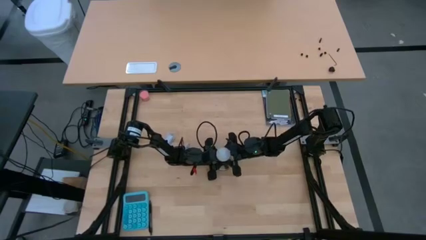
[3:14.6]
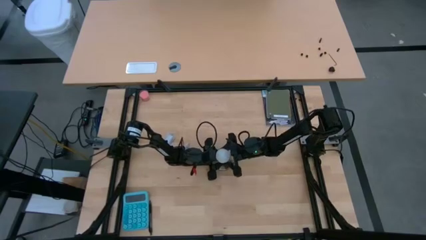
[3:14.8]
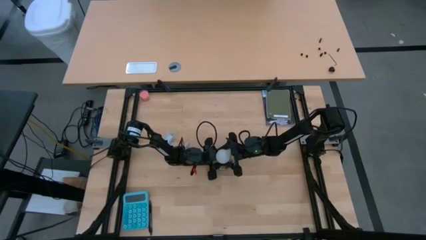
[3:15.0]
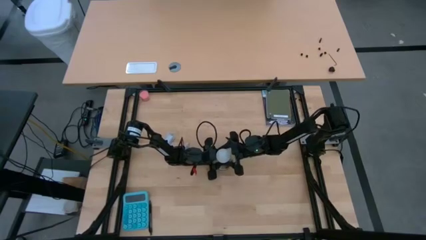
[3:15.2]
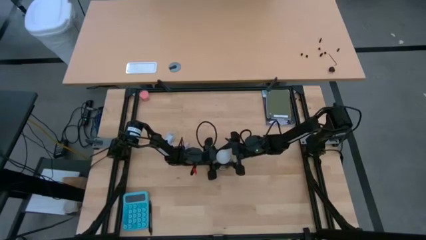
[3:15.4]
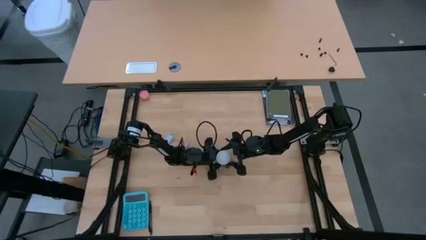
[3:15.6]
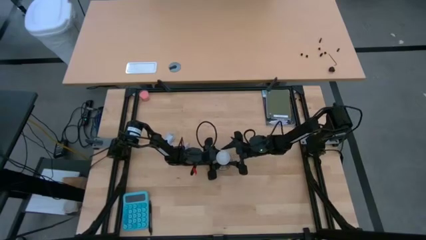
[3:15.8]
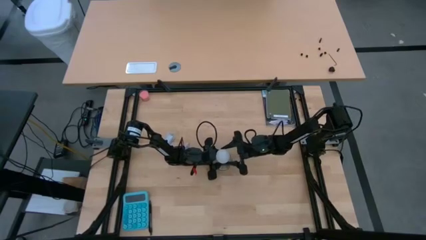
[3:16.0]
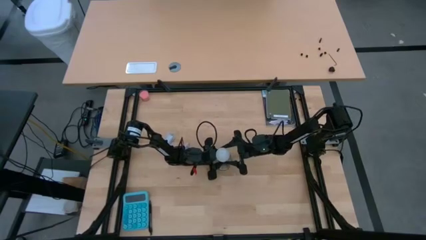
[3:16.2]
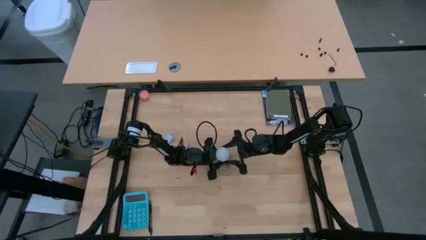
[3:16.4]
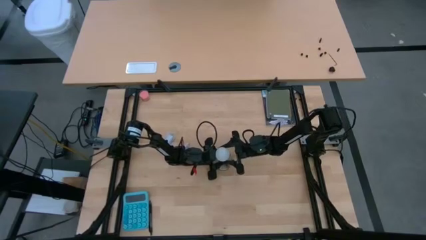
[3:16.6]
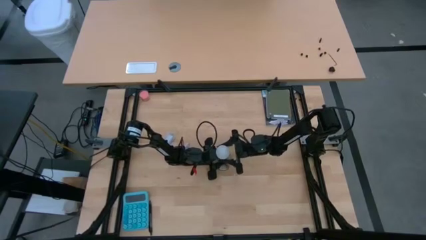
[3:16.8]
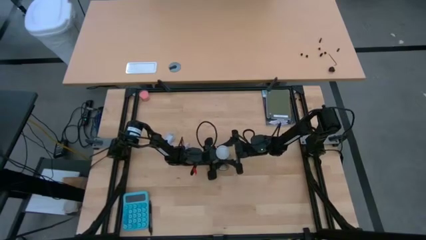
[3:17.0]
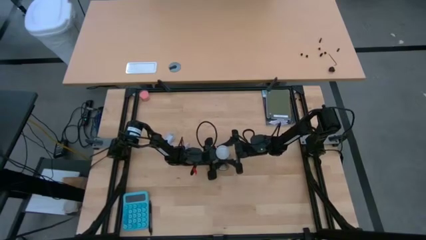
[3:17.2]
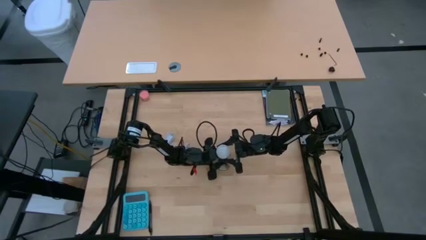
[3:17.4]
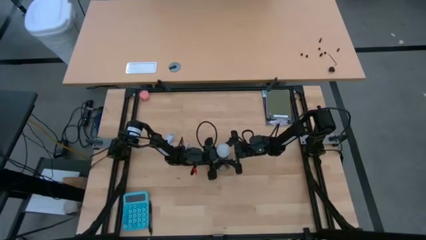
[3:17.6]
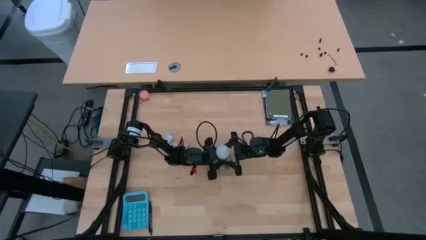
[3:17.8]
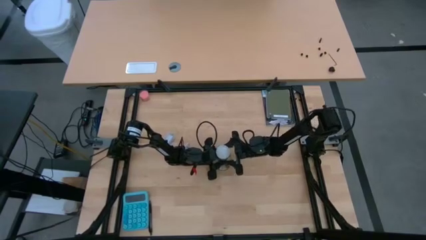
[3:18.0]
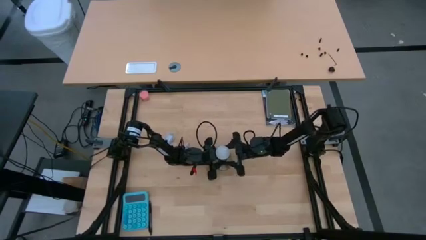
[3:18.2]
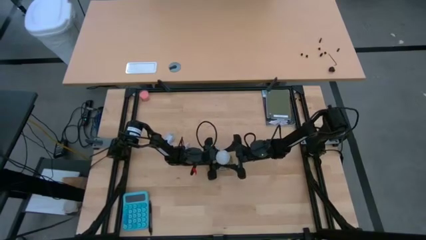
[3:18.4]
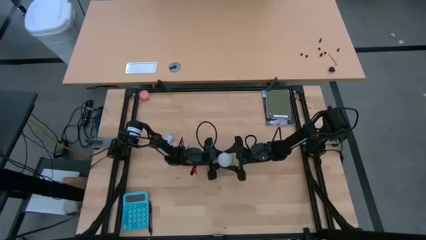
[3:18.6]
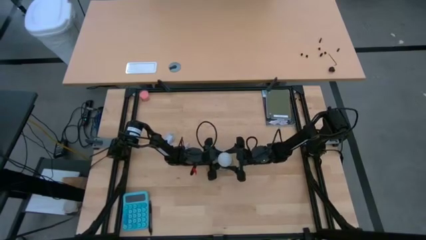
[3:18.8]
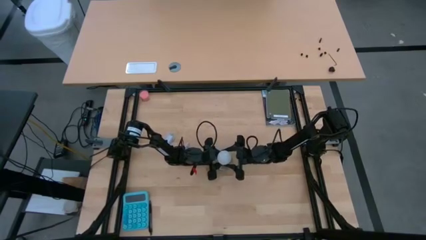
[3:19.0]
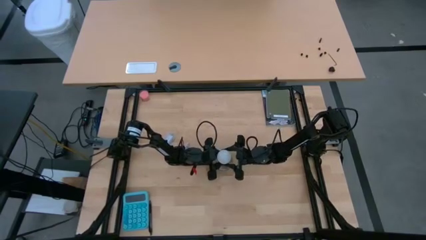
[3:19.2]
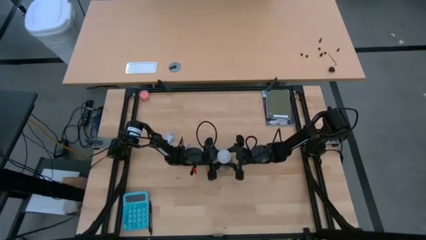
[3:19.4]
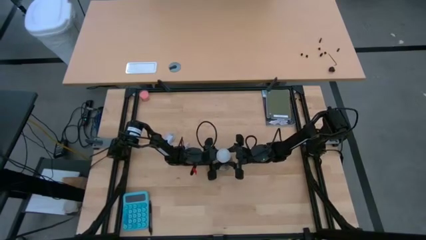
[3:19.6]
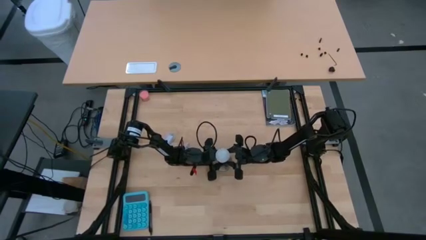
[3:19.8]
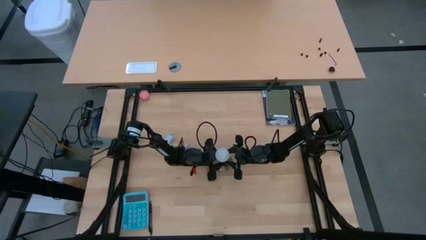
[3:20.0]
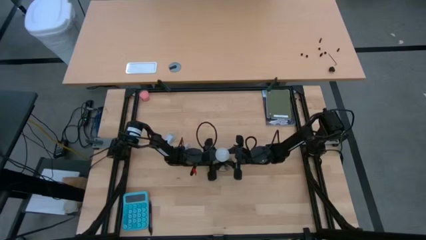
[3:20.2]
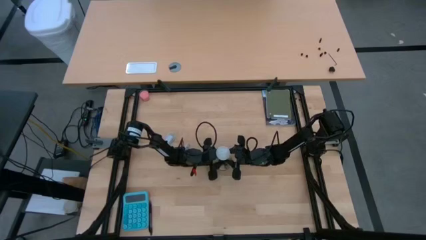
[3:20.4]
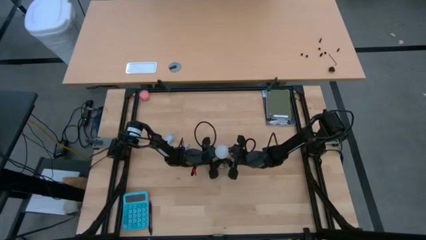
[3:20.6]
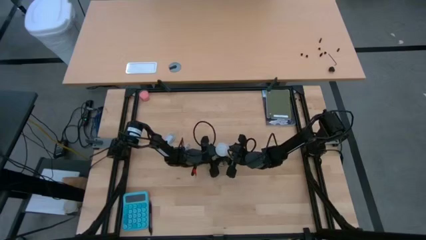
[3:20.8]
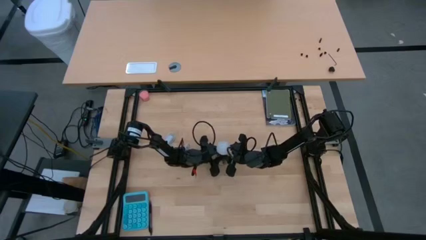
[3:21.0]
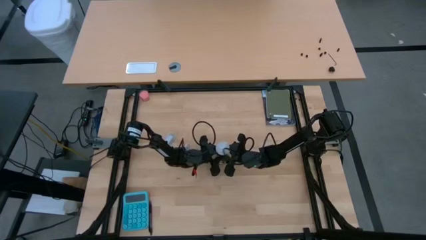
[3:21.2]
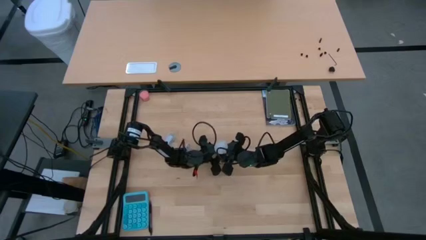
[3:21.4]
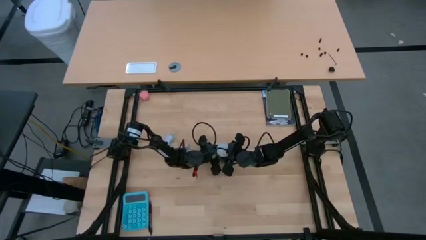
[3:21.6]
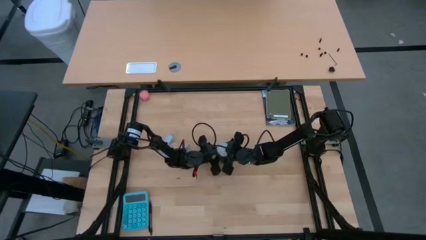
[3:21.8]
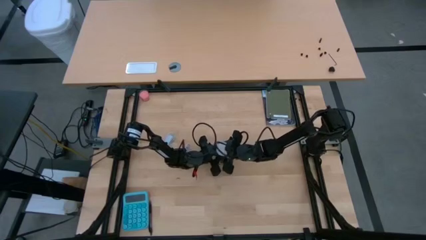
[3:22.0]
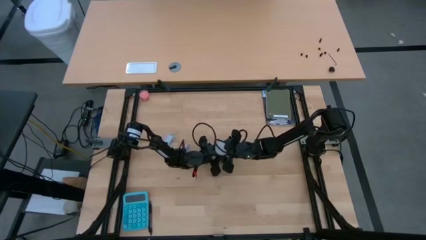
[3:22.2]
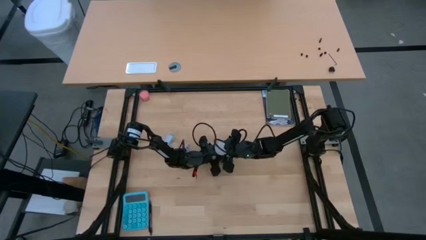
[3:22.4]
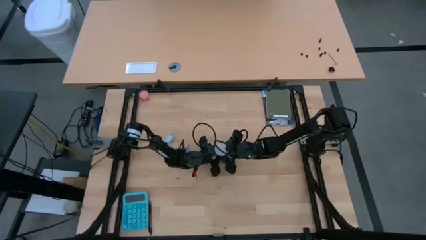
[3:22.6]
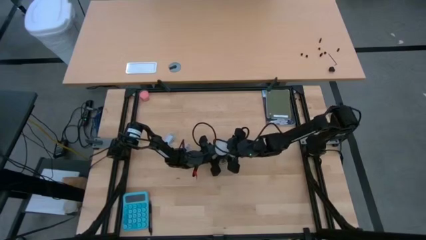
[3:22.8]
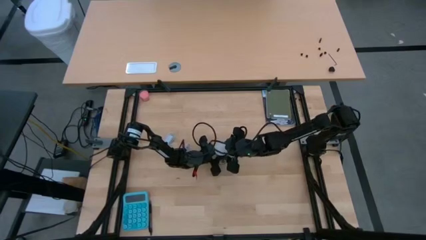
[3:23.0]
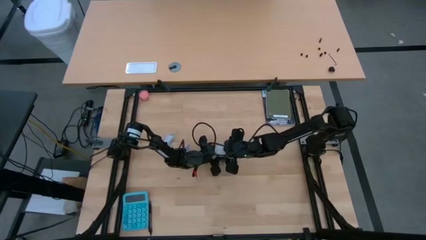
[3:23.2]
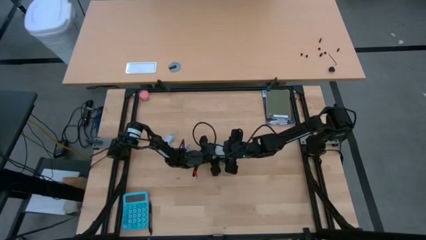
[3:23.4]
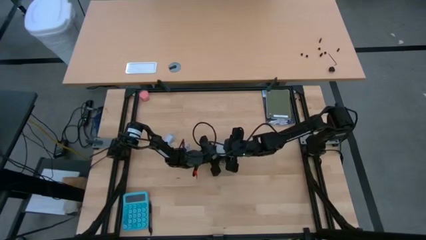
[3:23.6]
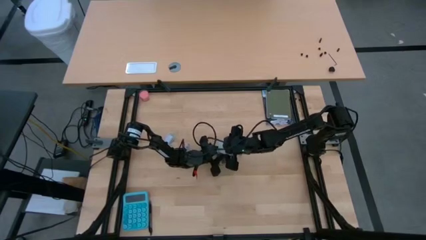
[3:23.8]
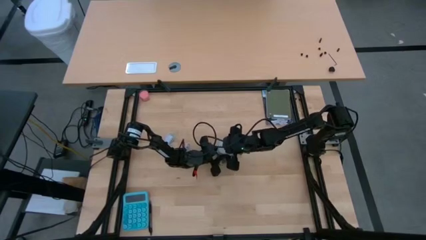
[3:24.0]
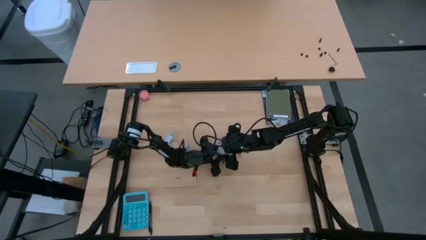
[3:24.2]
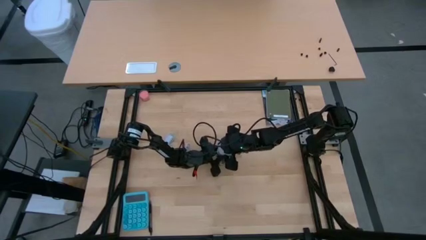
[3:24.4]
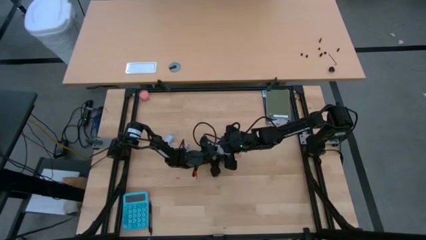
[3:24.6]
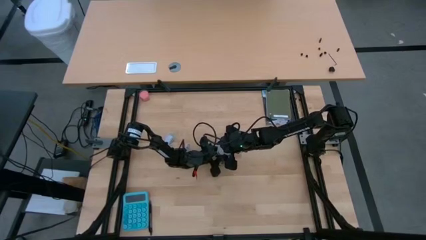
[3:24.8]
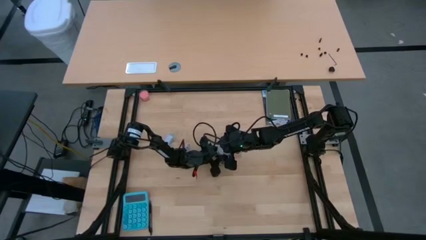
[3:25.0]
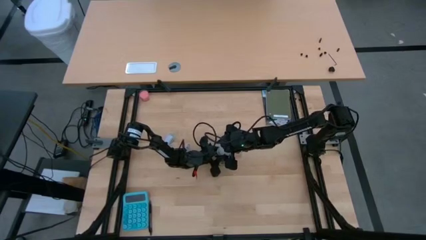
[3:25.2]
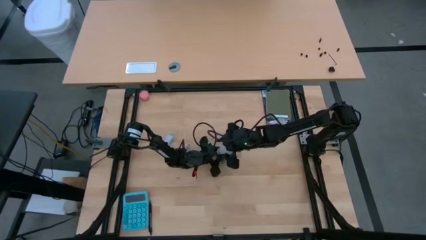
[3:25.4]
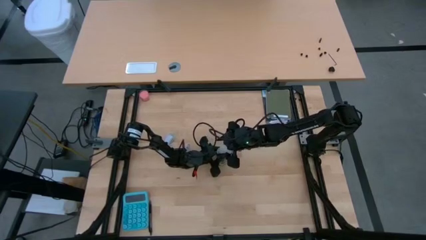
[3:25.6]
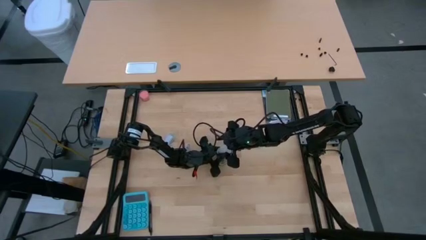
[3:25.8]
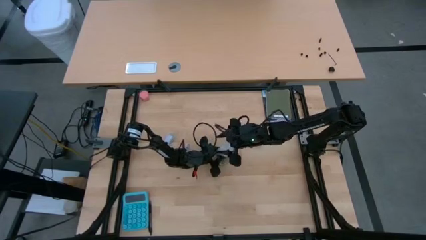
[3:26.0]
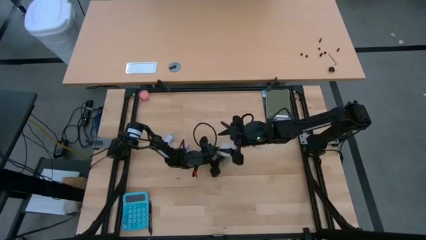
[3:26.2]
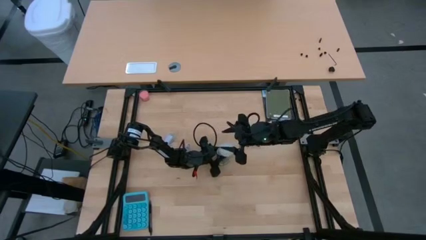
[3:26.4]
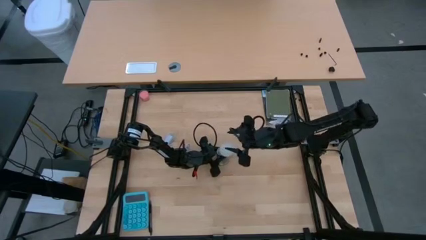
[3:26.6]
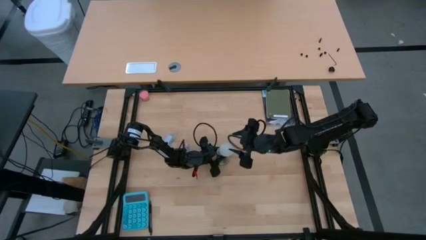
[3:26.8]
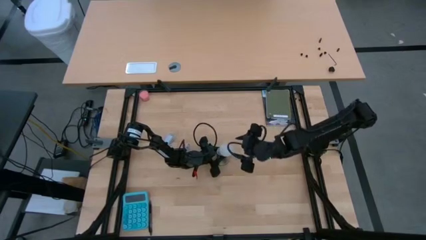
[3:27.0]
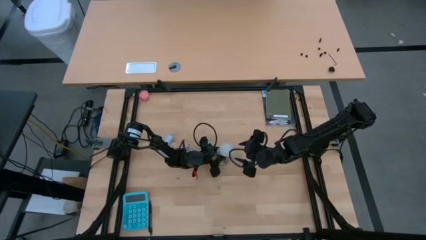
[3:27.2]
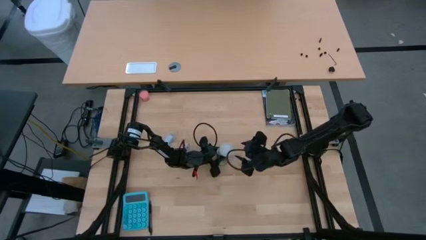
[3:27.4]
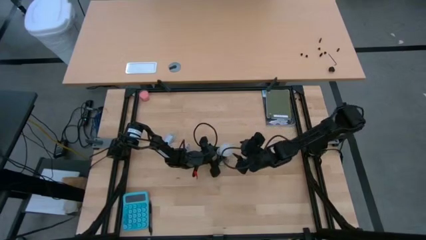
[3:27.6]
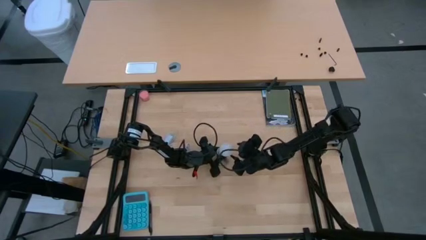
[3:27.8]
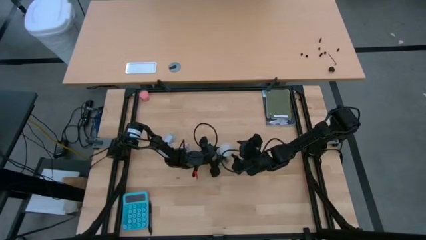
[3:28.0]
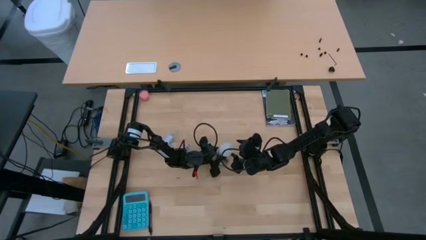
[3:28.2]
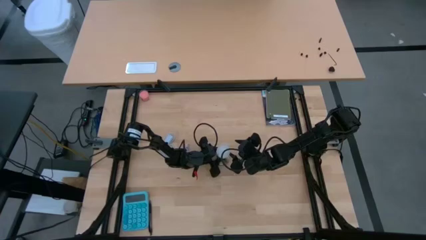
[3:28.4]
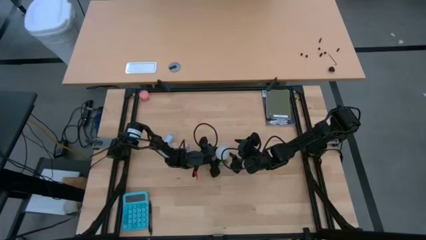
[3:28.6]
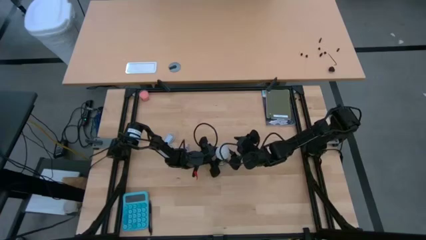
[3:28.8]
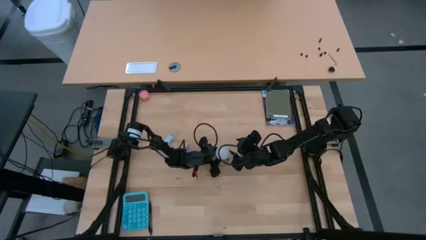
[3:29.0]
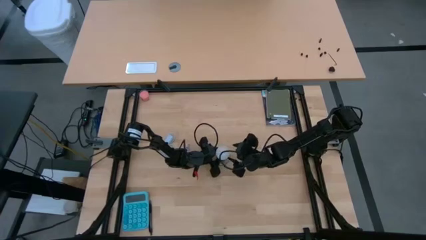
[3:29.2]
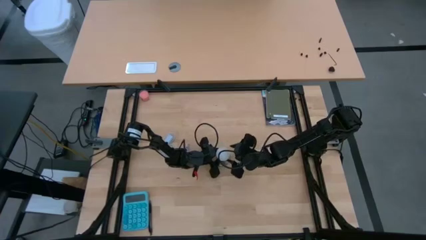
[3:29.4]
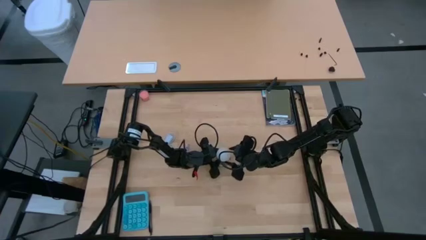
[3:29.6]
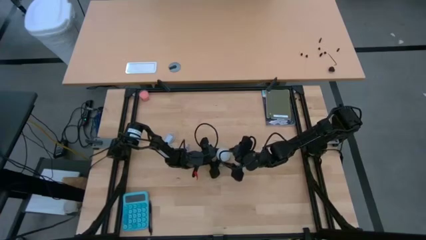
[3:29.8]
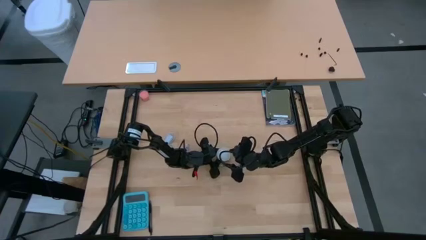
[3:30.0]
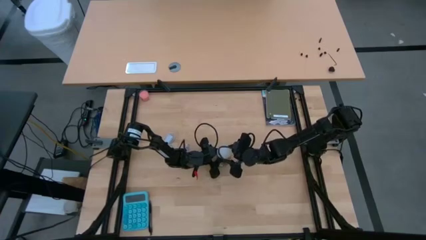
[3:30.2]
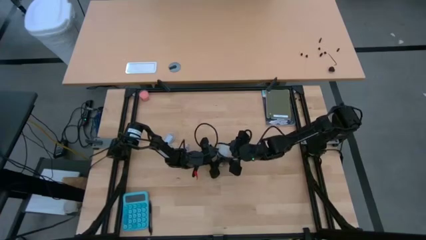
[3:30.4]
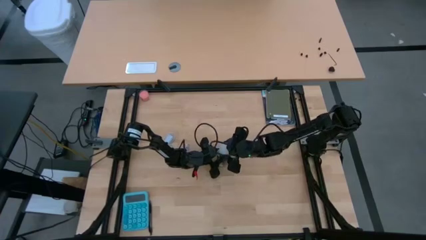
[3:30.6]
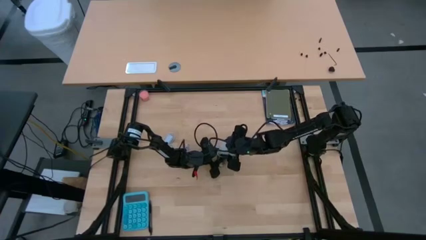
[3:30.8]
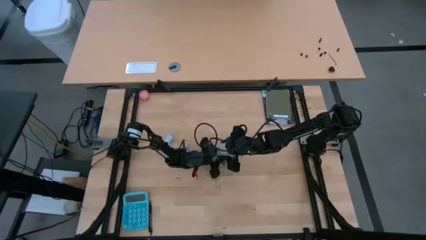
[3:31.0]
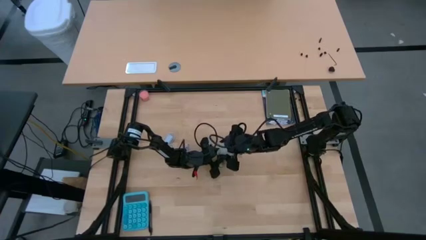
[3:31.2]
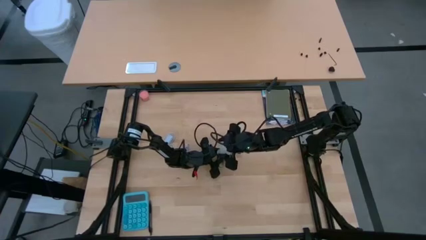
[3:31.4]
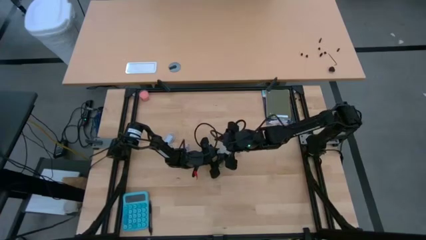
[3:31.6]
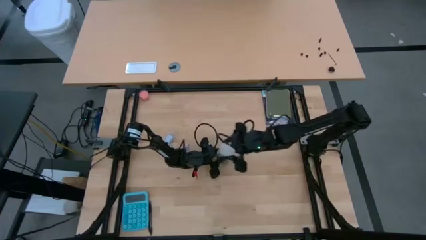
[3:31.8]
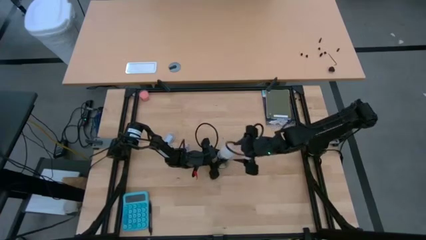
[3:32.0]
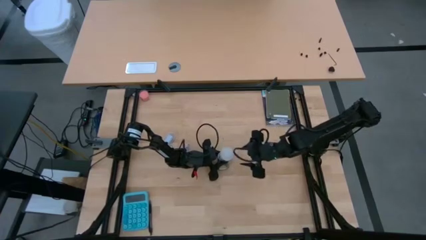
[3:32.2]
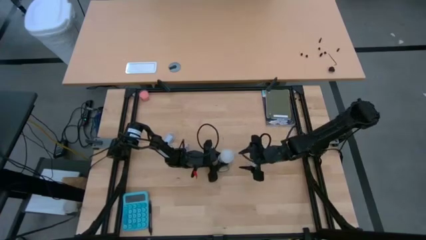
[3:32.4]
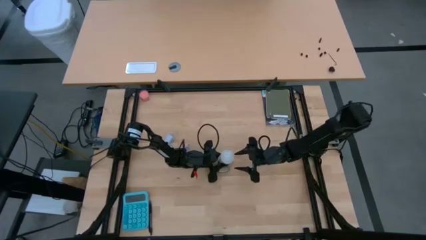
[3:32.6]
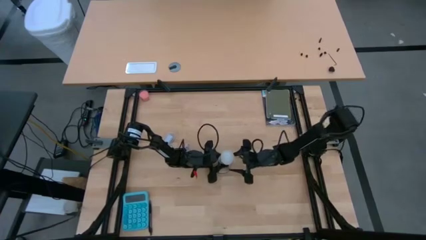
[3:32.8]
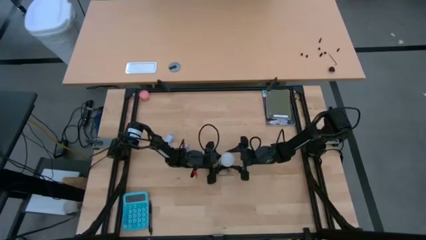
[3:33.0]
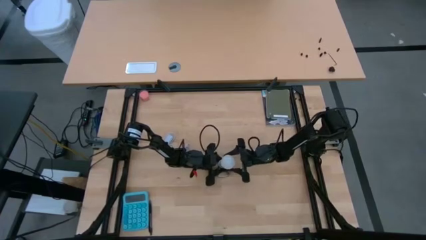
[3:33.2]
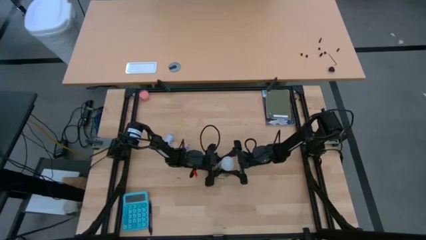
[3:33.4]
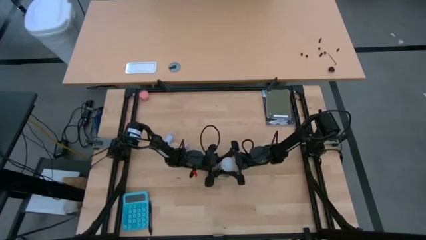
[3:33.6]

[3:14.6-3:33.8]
Task: Screw lightbulb
Insert the lightbulb into the lamp holder
